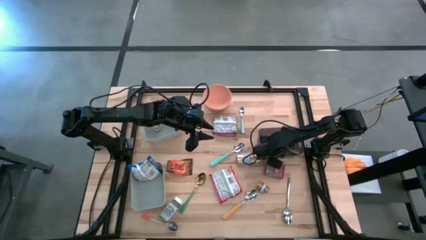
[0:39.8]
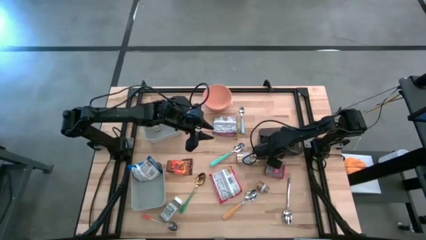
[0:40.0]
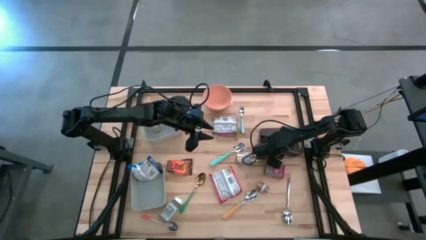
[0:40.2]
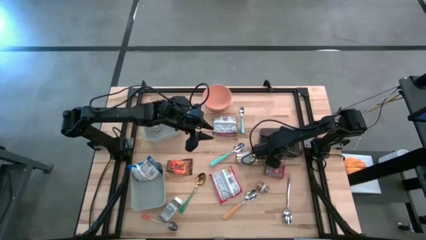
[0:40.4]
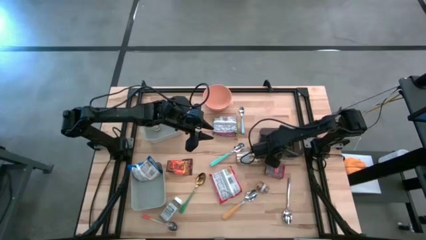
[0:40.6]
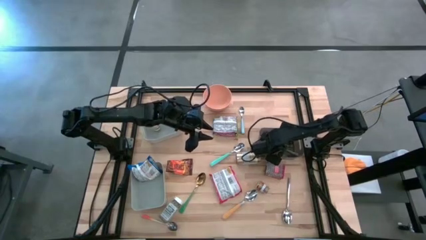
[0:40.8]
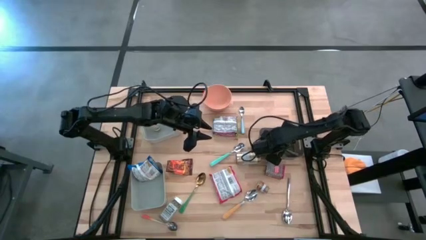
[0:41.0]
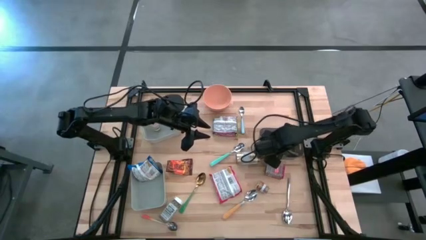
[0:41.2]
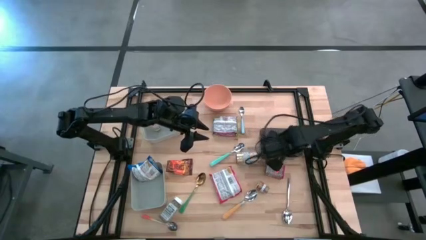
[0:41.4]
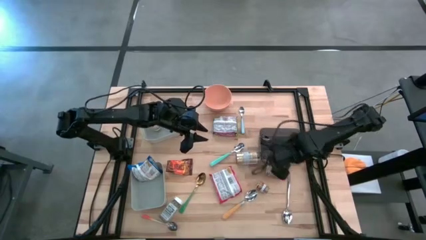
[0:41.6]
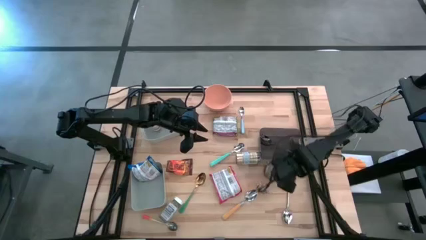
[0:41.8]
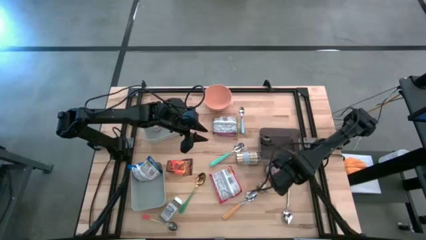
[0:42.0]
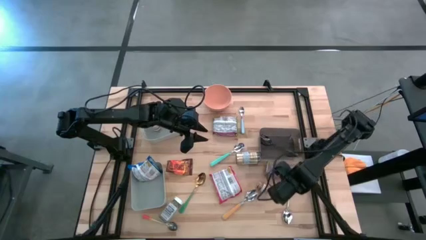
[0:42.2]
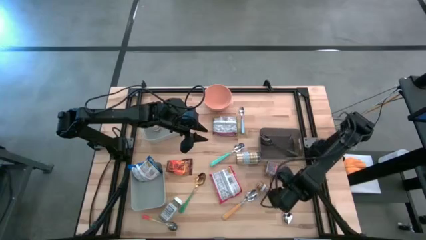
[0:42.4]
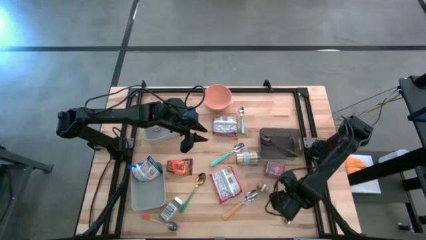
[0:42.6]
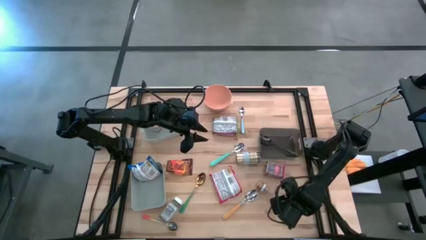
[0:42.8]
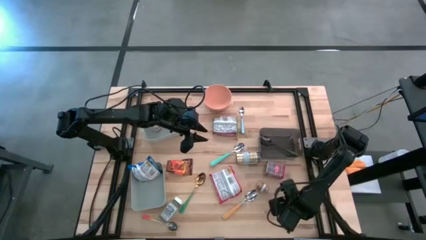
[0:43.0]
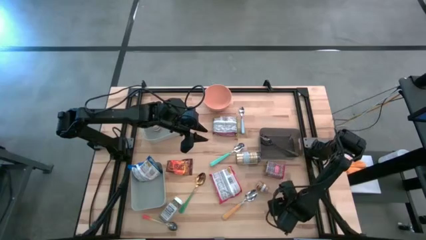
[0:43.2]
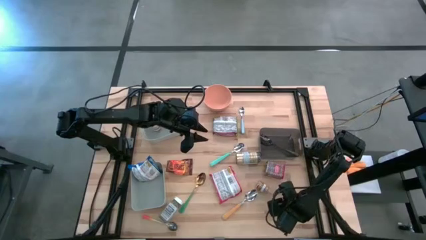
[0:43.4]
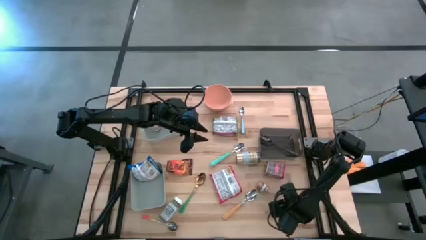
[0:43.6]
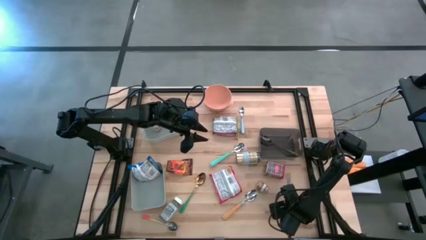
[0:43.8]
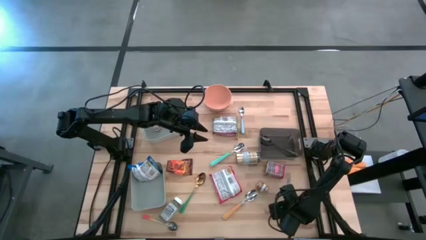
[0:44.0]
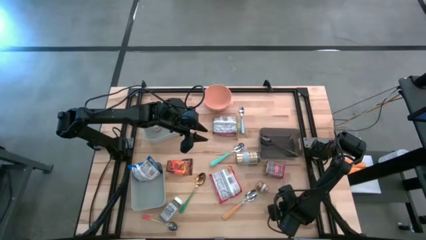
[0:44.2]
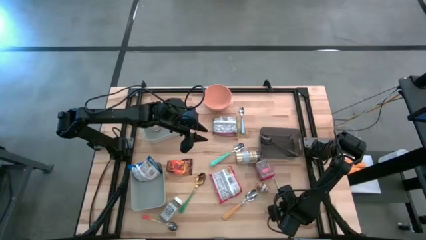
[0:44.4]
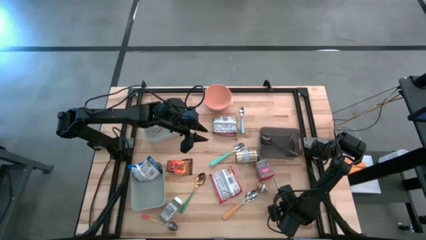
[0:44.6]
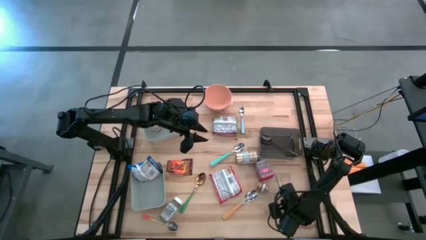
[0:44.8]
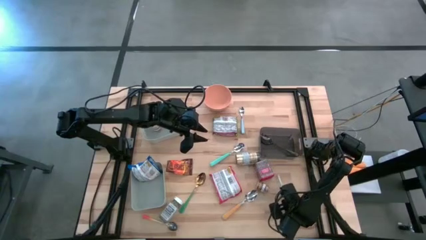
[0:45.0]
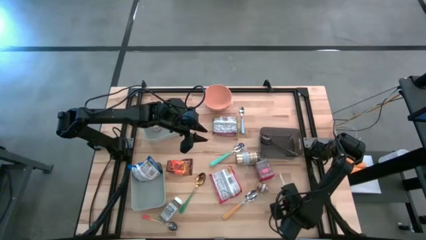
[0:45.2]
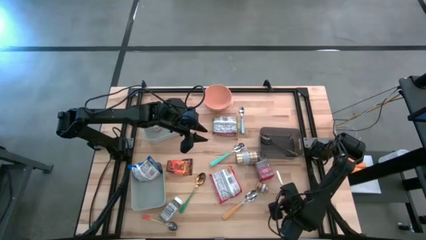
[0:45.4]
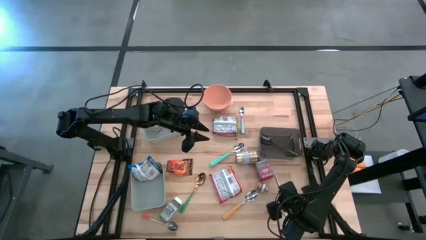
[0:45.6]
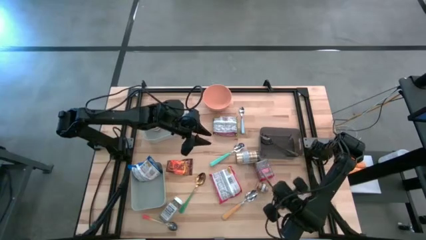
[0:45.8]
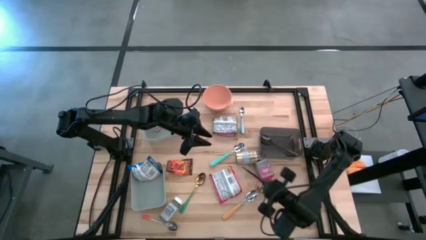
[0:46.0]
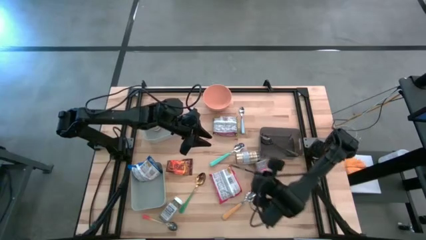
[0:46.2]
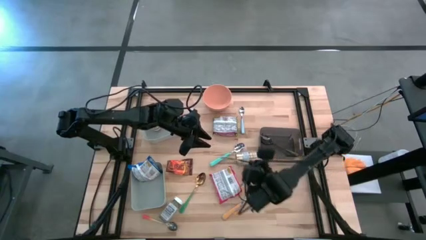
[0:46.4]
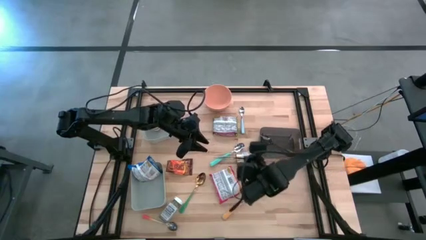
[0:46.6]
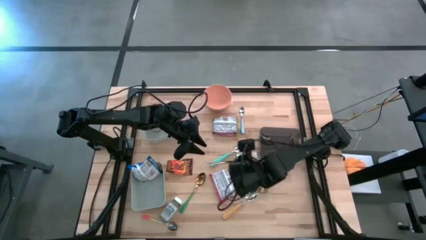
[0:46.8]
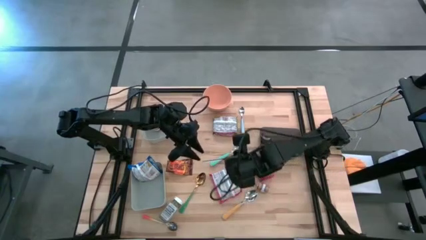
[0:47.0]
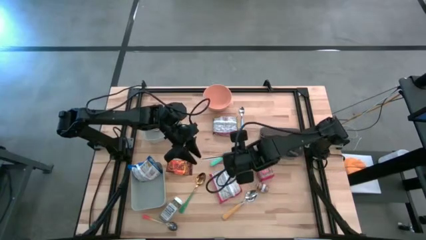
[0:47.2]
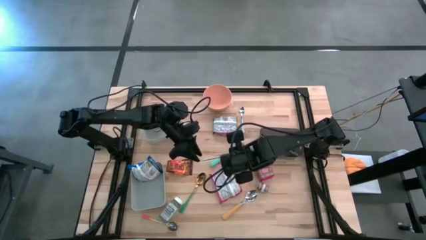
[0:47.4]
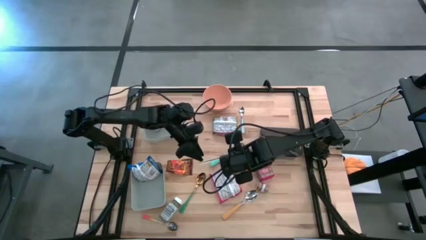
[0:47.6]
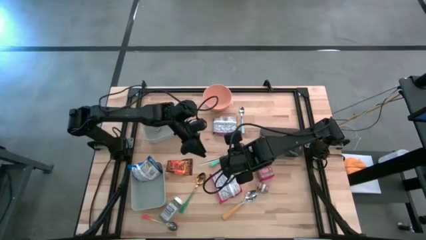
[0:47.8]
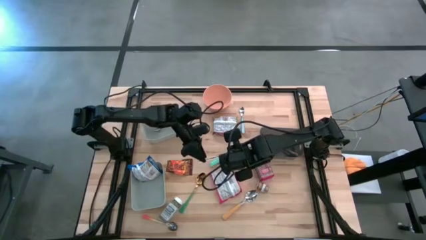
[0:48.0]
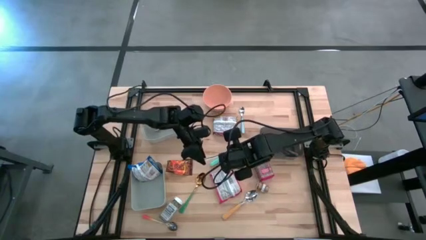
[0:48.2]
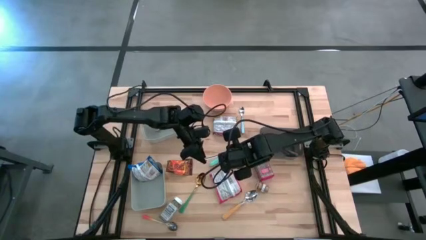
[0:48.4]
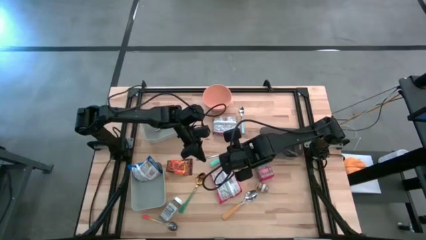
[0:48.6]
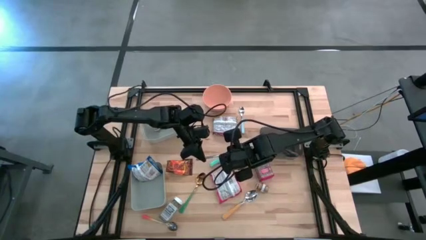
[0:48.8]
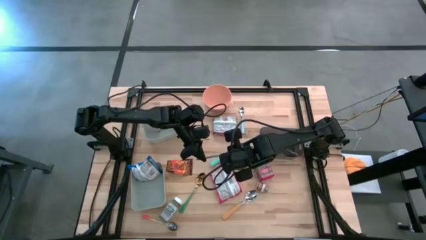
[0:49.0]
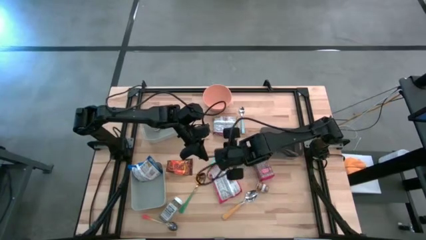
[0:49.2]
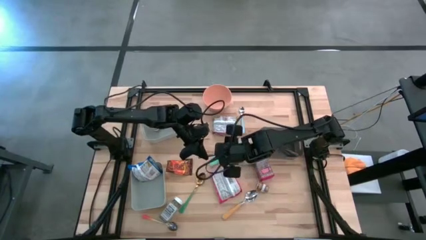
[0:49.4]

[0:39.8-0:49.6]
Put the silver spoon into the black bin

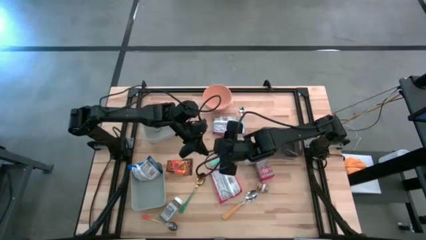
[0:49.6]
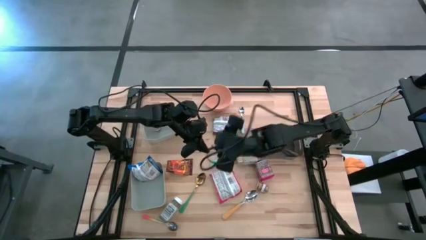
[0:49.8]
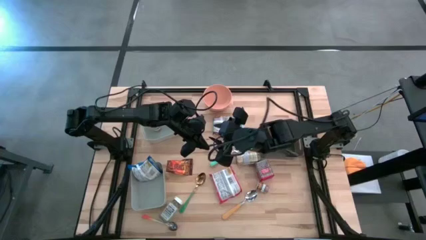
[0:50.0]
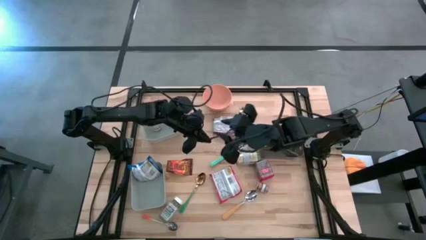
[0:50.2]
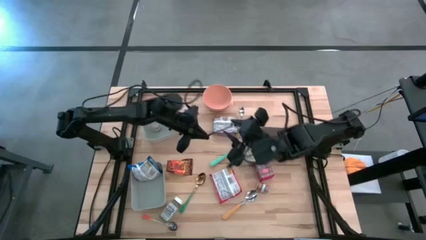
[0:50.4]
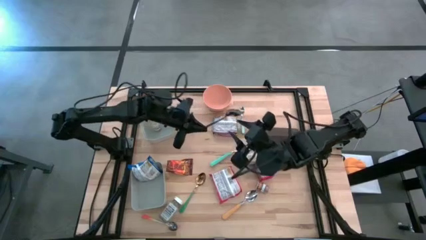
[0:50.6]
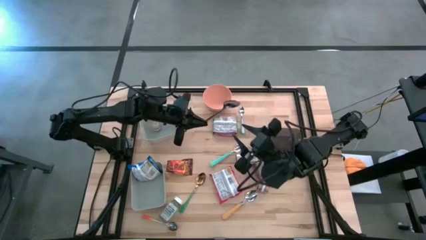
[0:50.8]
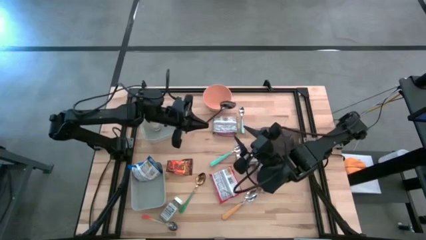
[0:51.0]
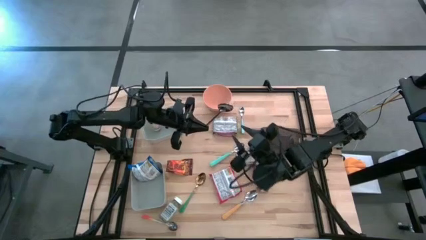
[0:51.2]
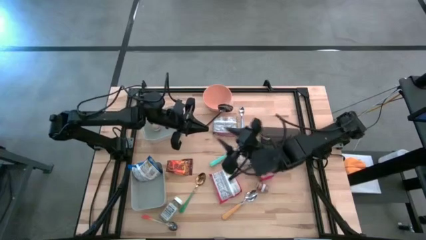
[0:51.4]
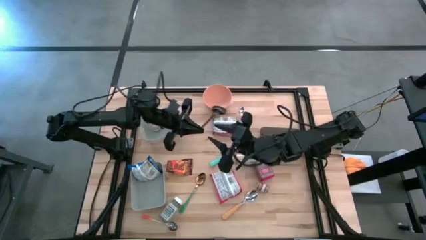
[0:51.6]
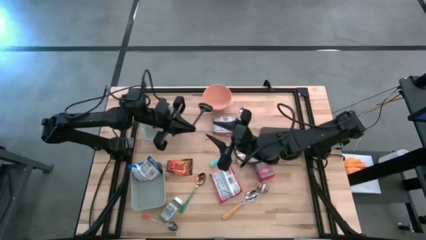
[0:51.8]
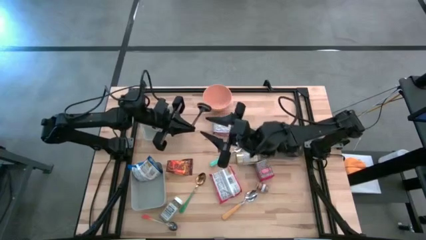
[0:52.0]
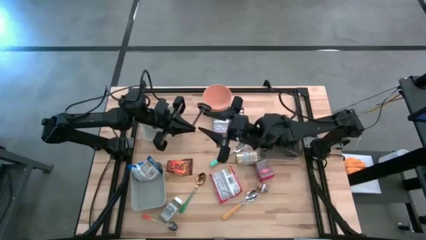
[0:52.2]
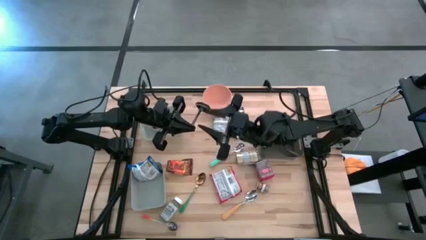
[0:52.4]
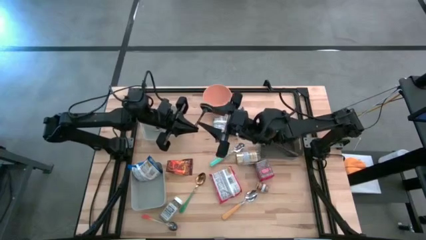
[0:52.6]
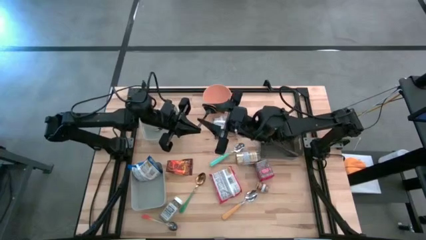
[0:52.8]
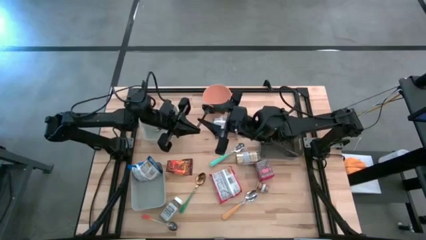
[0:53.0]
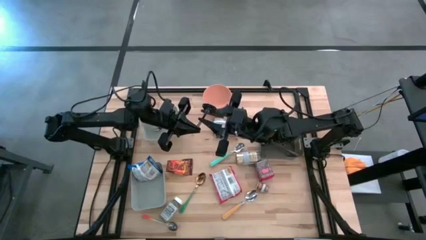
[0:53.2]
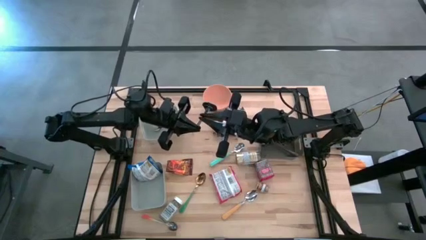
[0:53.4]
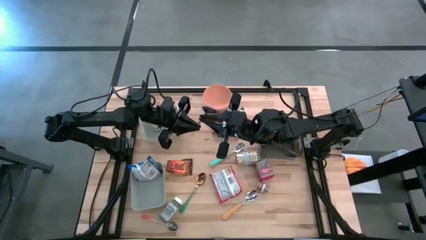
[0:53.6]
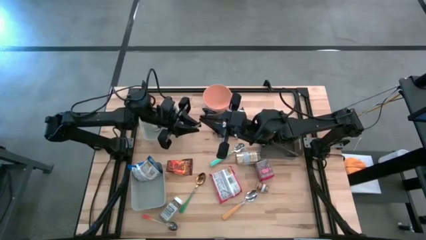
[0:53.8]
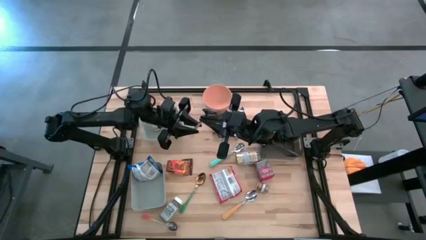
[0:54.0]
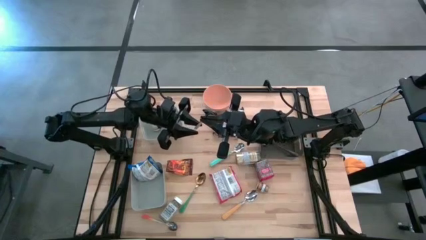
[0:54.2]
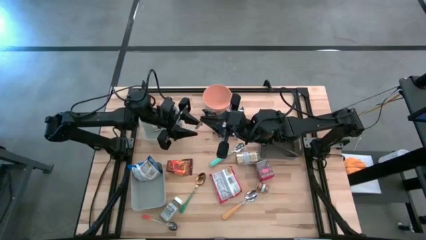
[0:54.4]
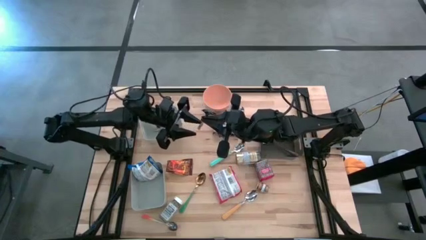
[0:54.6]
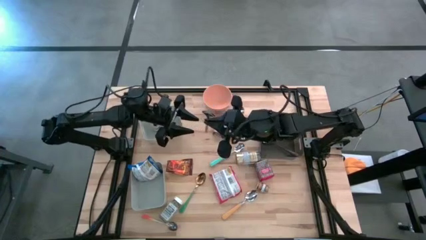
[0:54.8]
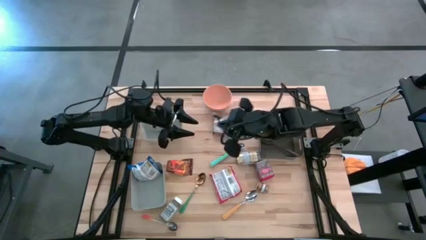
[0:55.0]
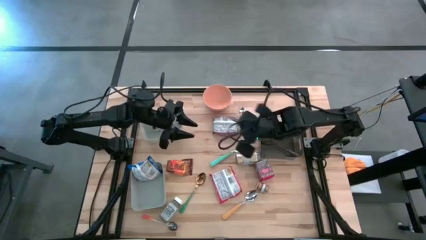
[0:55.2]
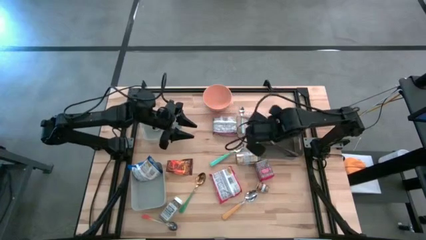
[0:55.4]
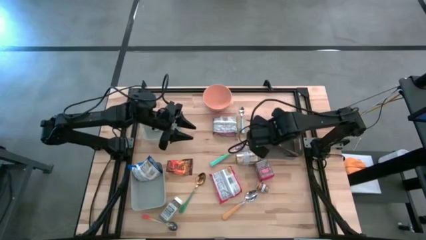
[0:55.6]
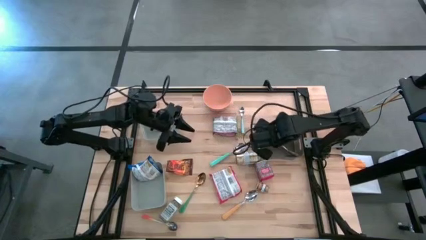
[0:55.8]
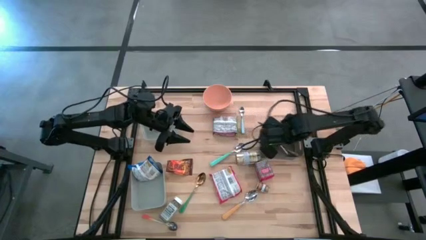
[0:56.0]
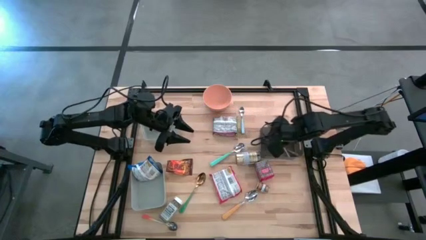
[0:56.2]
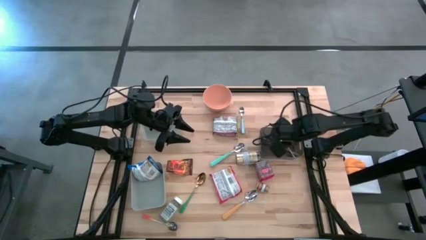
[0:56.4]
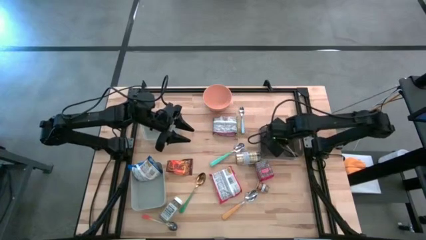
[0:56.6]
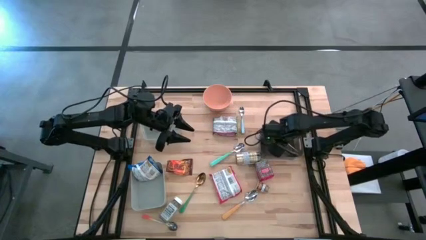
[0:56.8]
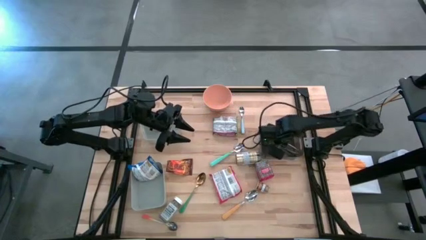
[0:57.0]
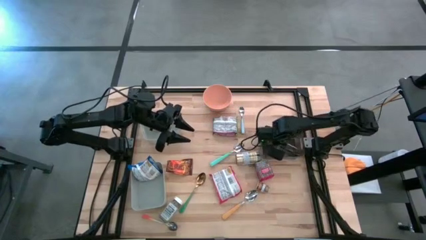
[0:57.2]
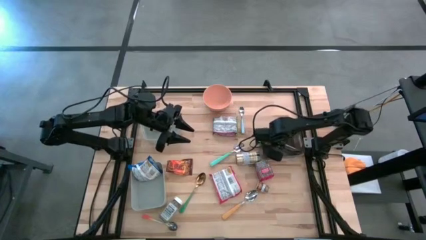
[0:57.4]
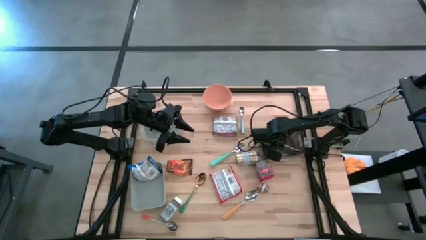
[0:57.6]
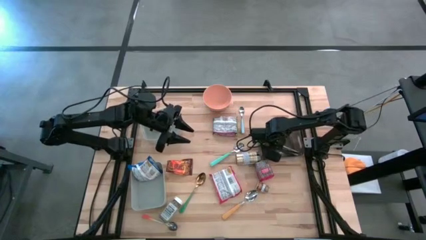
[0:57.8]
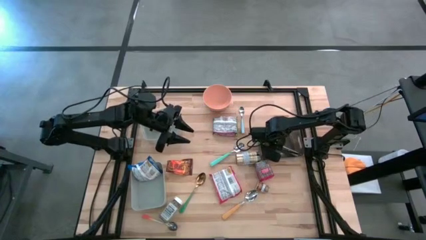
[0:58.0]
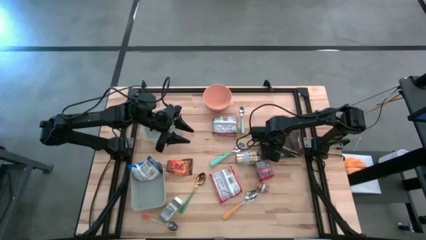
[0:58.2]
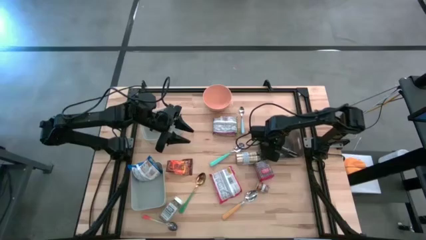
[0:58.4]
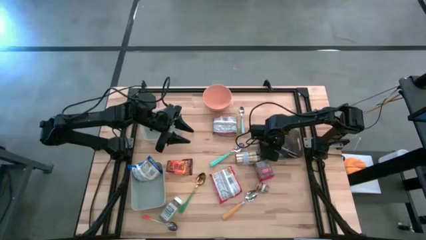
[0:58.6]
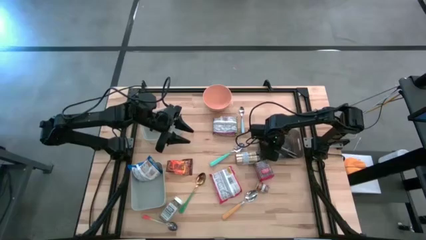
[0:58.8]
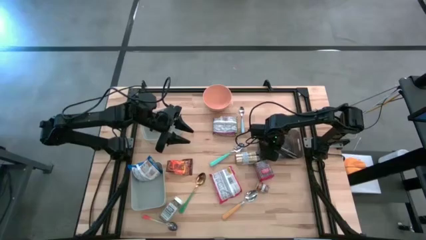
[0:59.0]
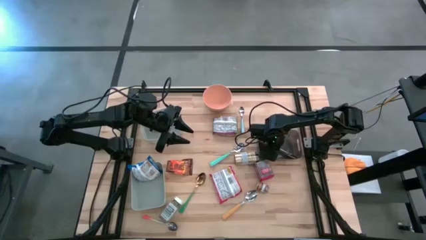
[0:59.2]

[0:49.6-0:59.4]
Put the silver spoon into the black bin
